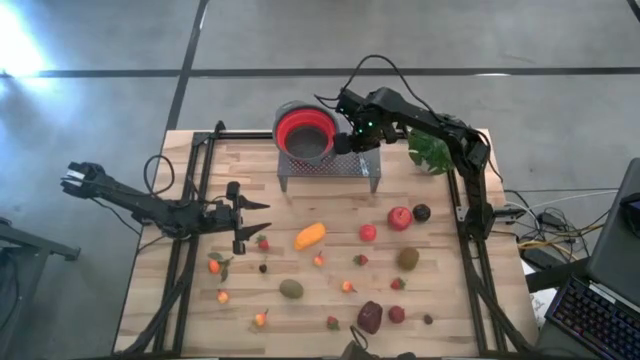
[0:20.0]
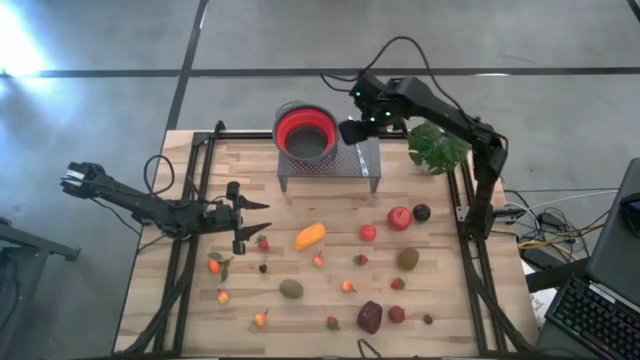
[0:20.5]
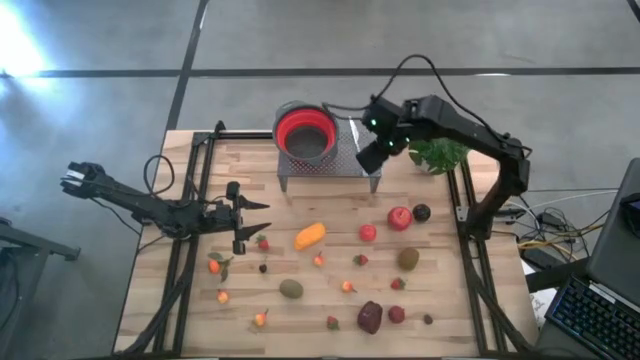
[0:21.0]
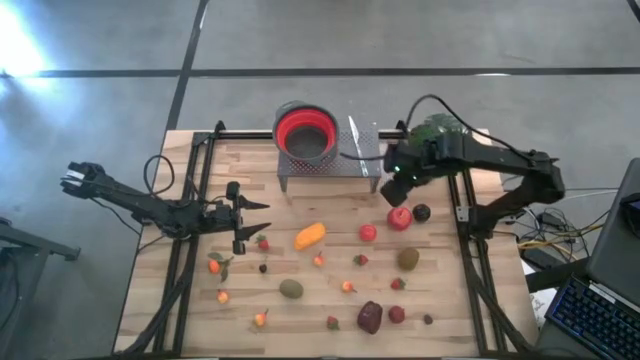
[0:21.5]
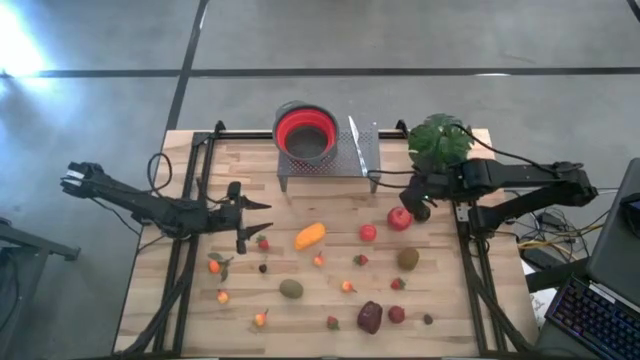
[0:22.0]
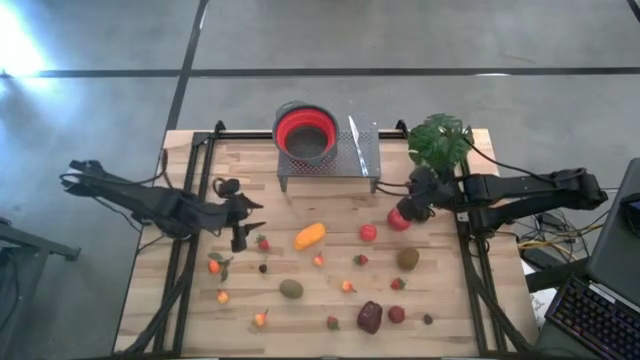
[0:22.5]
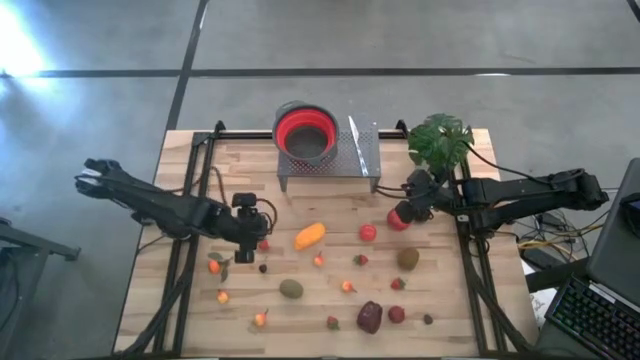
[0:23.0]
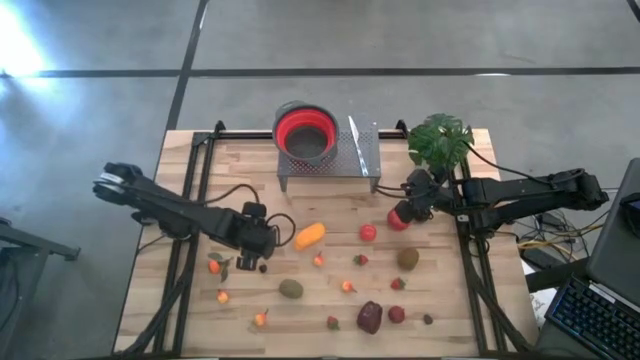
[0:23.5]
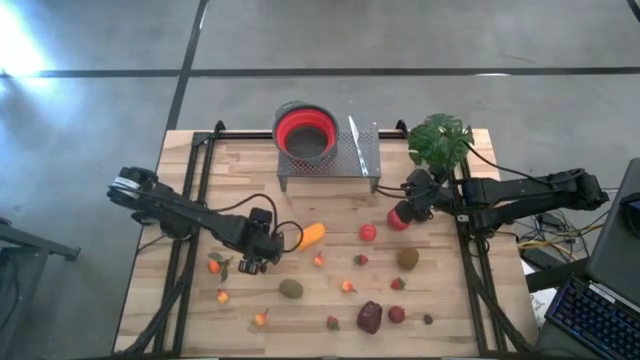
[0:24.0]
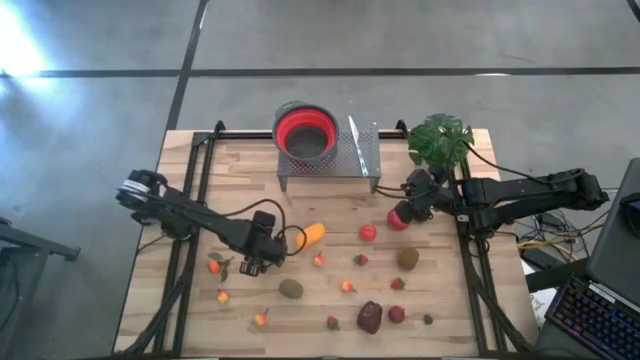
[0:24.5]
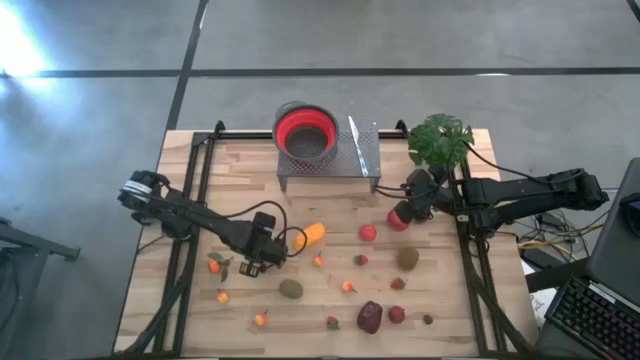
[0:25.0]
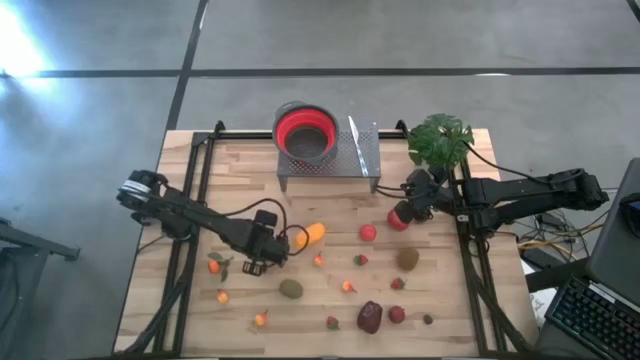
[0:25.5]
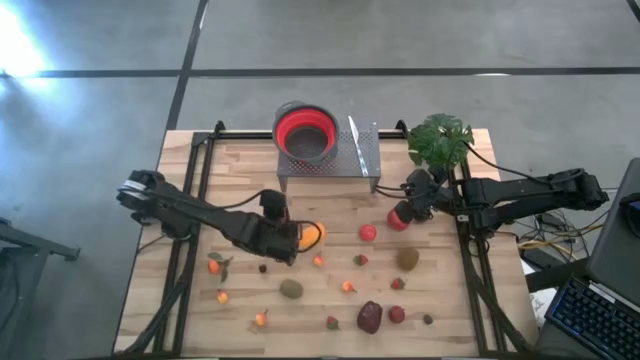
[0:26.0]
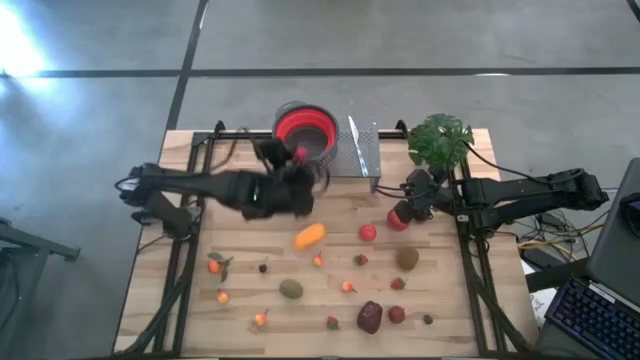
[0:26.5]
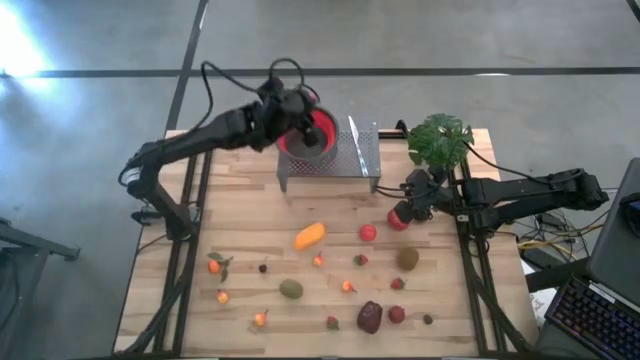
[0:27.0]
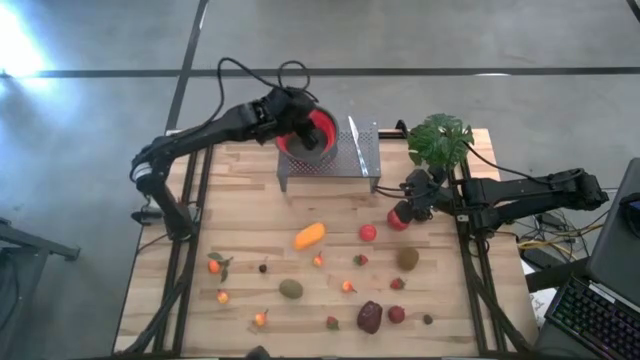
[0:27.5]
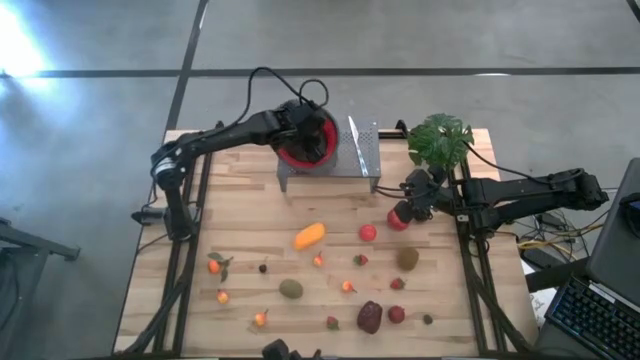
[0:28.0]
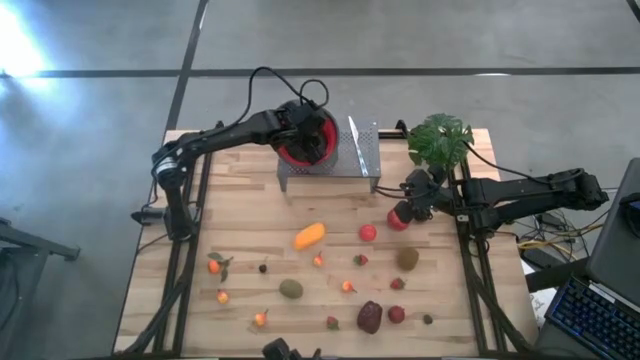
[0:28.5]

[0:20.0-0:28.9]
Task: Pick & Place Fruit
Put the top left red strawberry into the red strainer bowl on the shelf

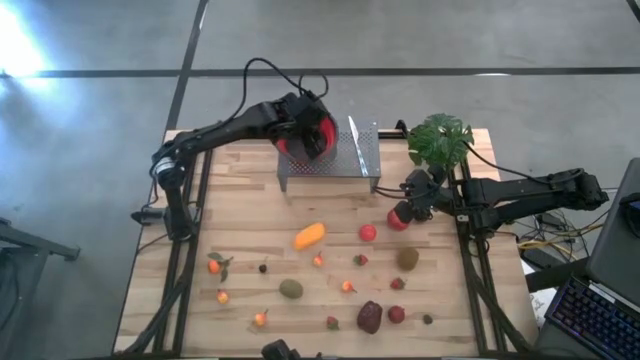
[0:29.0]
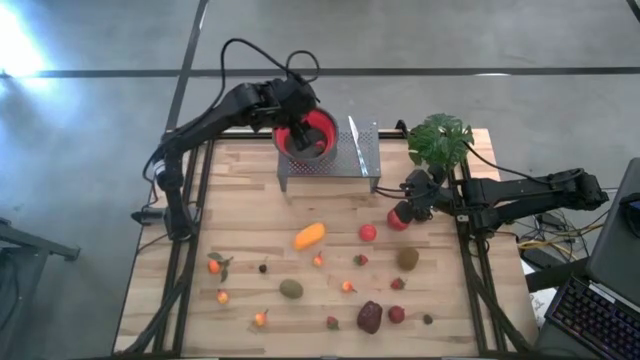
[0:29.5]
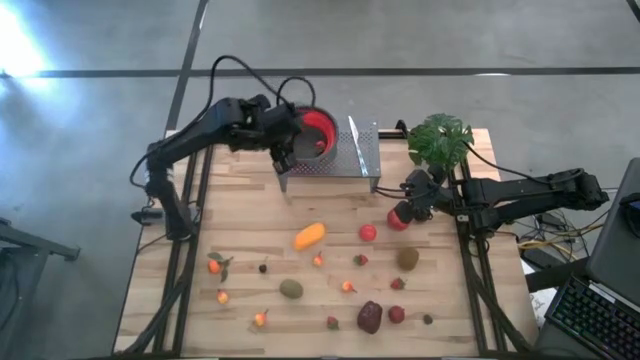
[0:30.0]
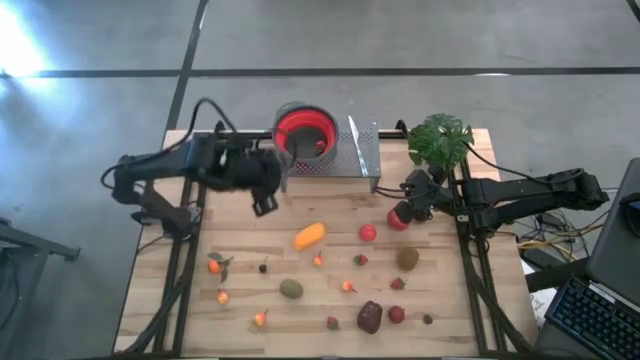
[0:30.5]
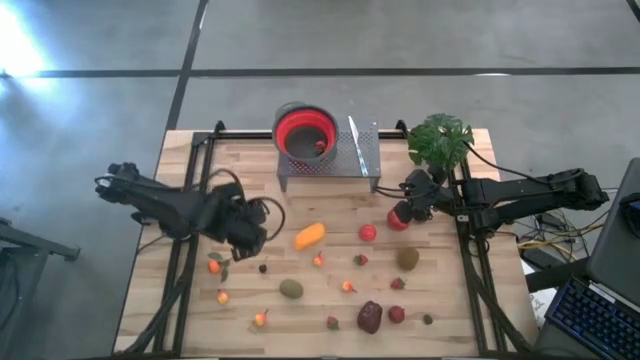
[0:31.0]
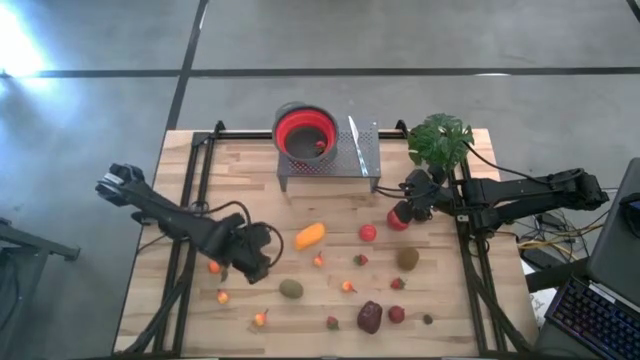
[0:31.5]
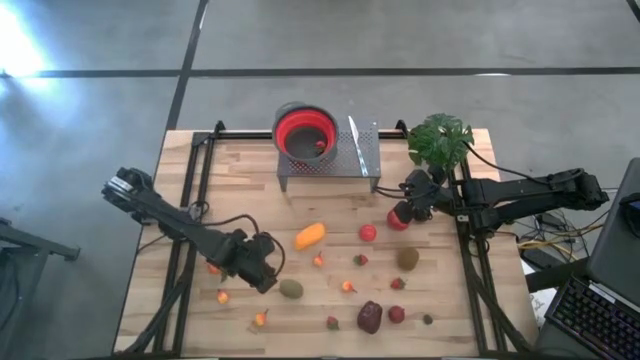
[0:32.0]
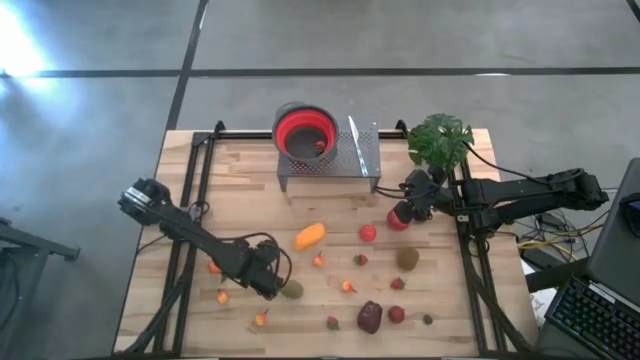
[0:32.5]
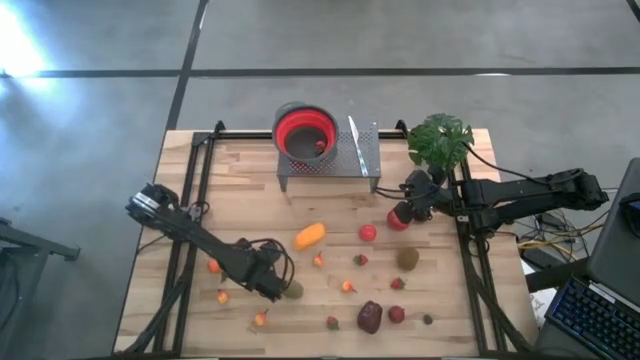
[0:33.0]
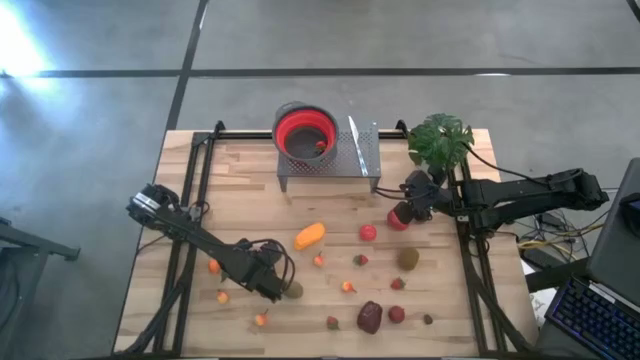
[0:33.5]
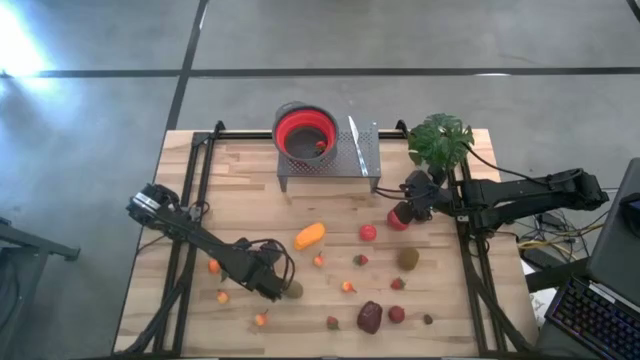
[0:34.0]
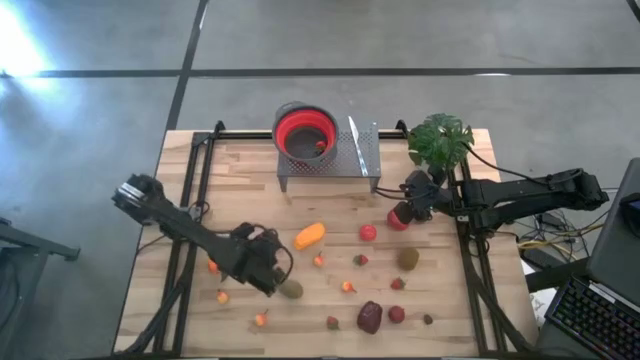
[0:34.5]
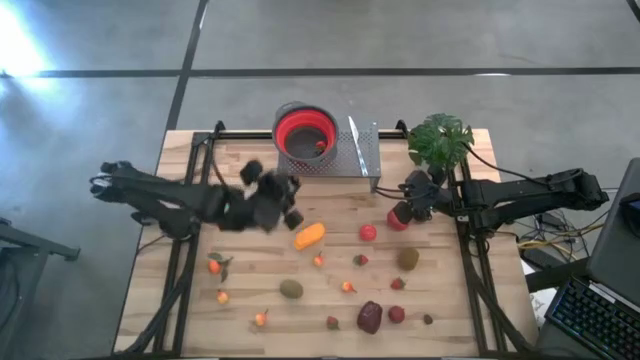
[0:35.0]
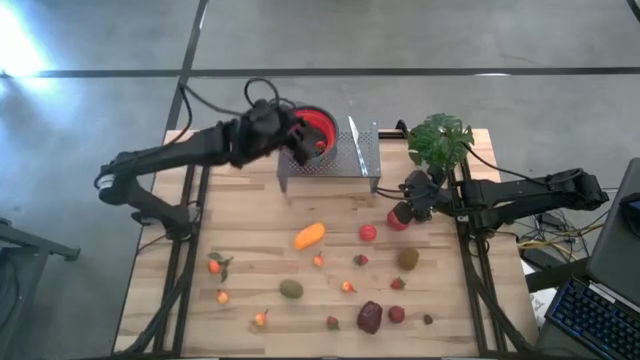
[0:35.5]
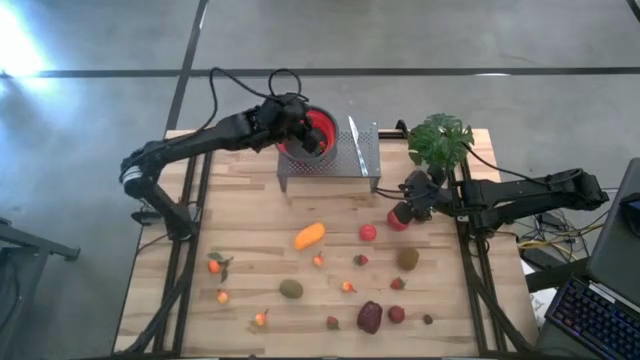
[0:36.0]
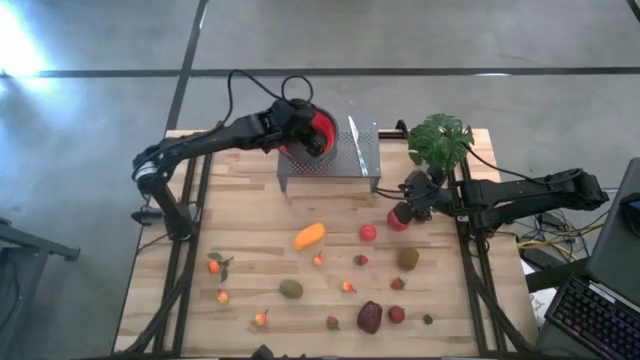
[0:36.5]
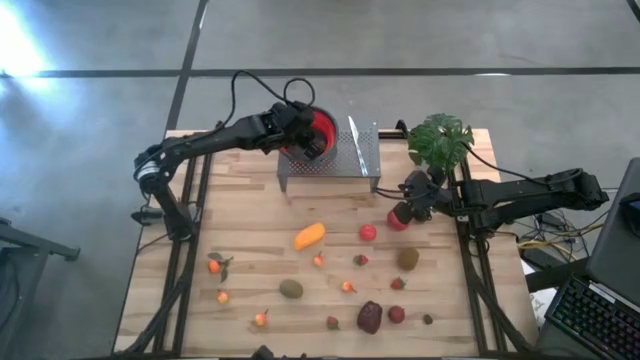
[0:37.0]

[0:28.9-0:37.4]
Put the black grape into the red strainer bowl on the shelf

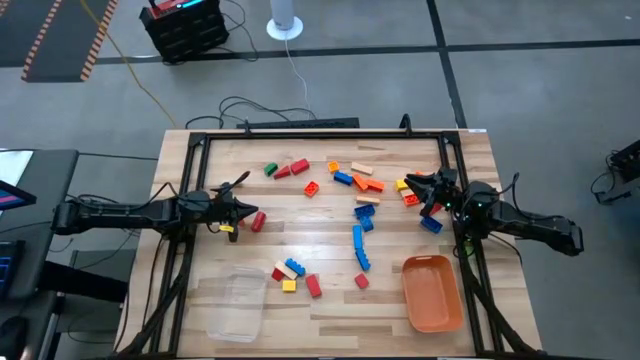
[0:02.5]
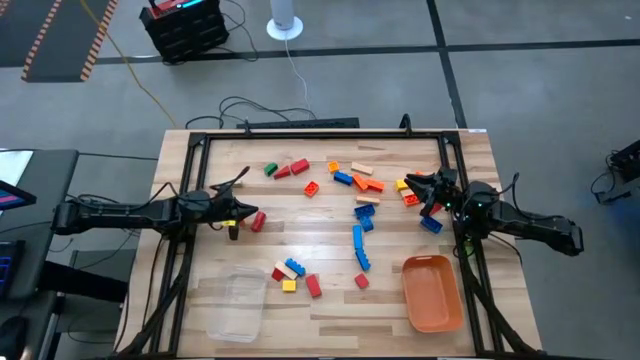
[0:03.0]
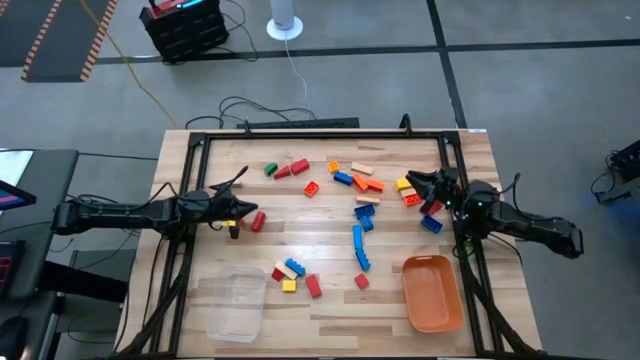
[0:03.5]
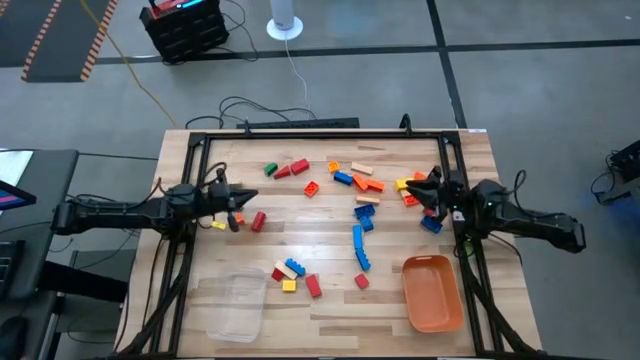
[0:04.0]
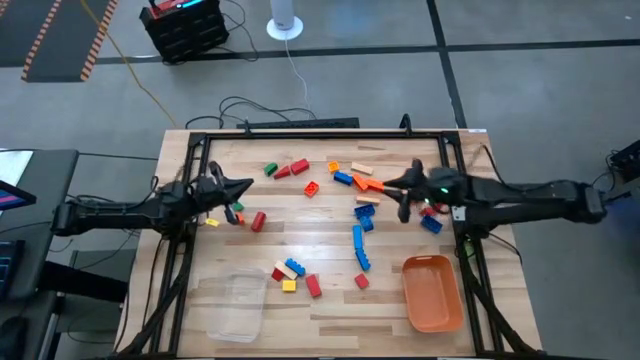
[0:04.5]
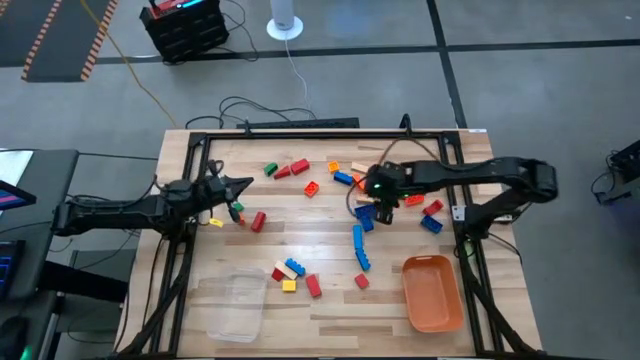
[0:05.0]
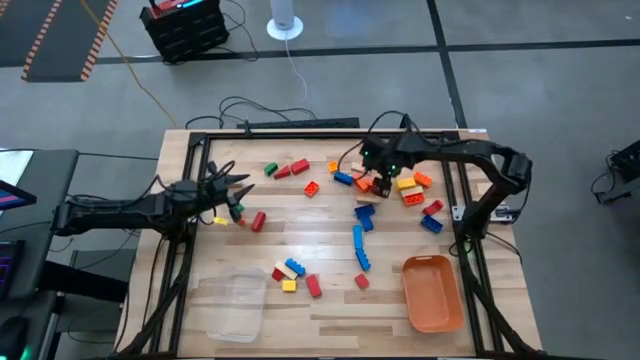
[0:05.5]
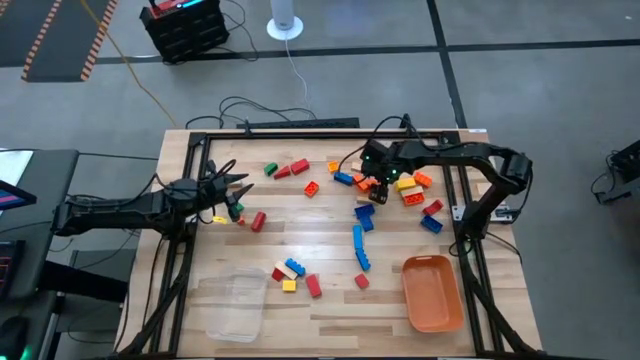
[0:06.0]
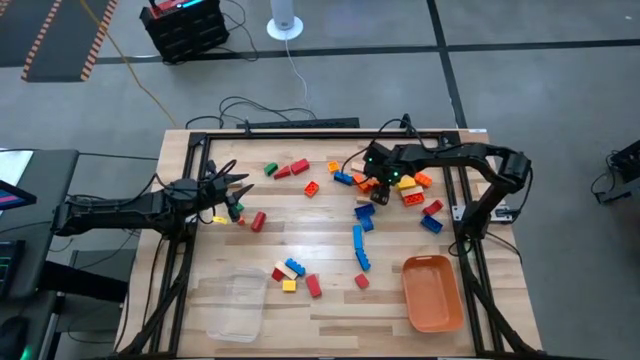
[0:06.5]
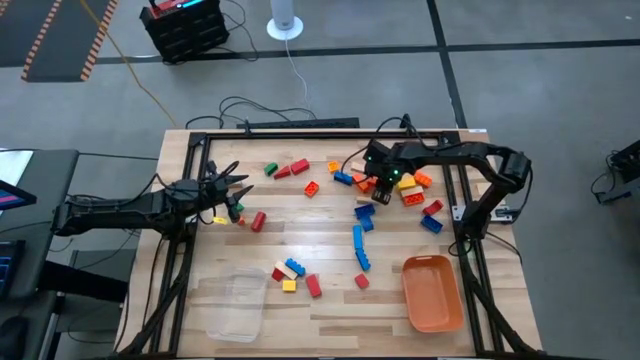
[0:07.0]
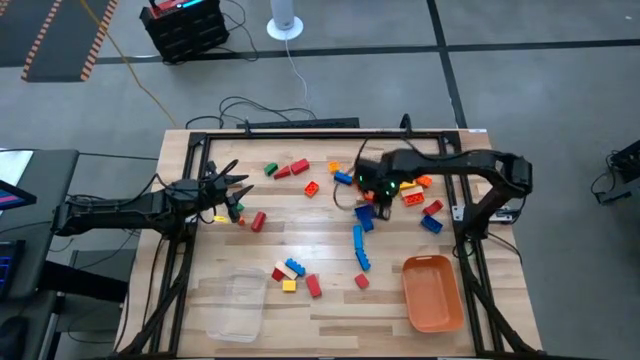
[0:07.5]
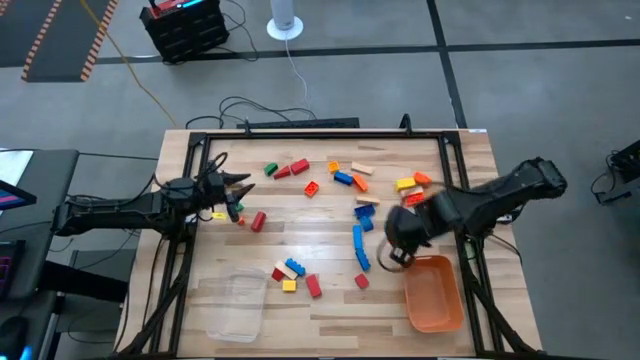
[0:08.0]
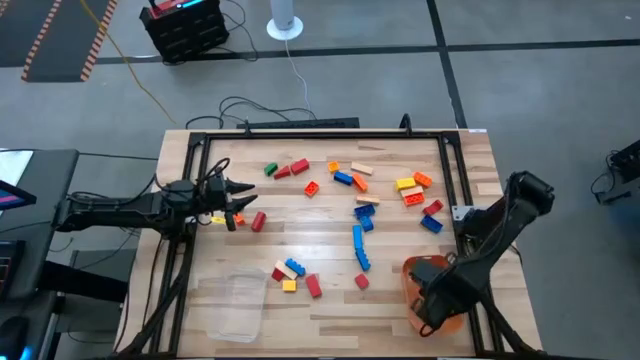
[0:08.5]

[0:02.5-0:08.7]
Task: Sort blocks by size
Put the large orange game piece into the orange bin
